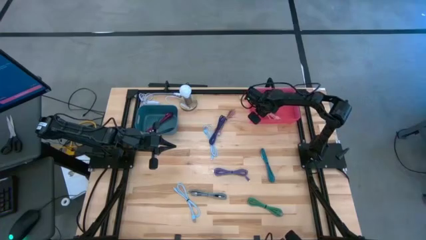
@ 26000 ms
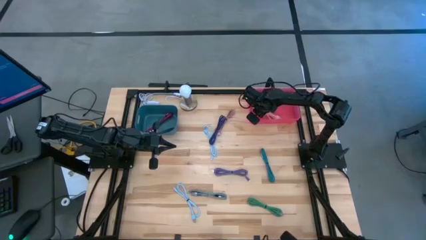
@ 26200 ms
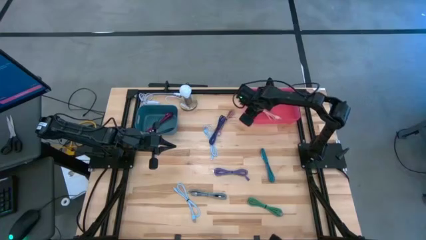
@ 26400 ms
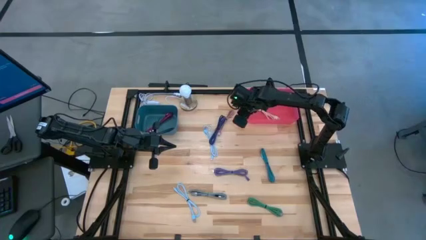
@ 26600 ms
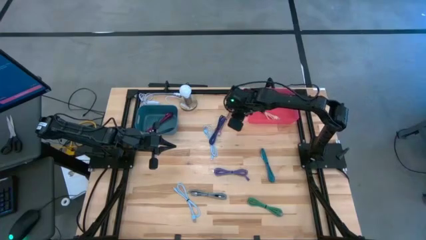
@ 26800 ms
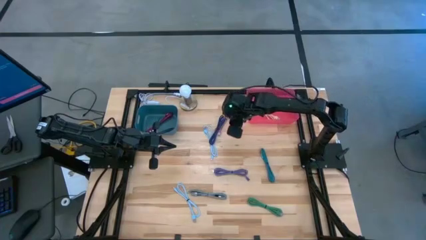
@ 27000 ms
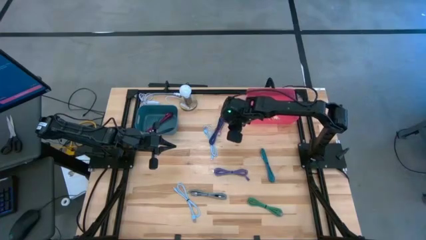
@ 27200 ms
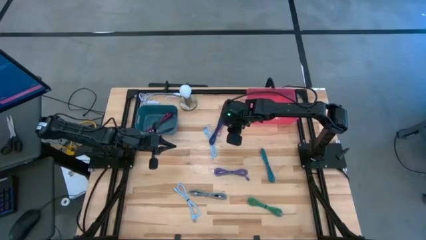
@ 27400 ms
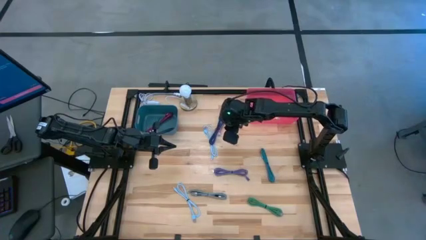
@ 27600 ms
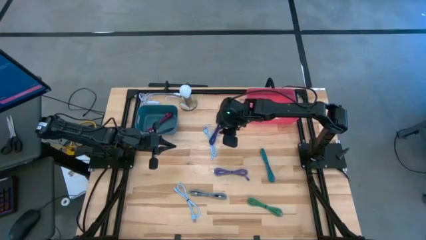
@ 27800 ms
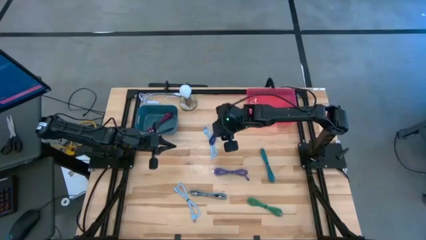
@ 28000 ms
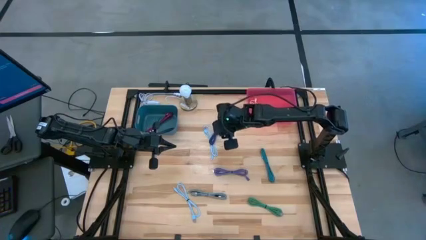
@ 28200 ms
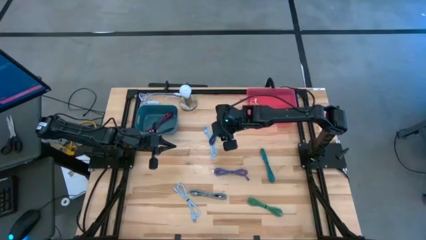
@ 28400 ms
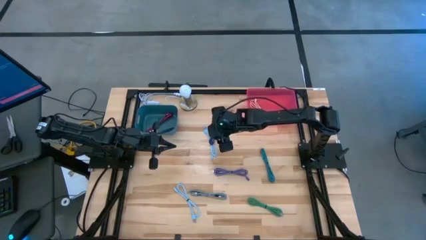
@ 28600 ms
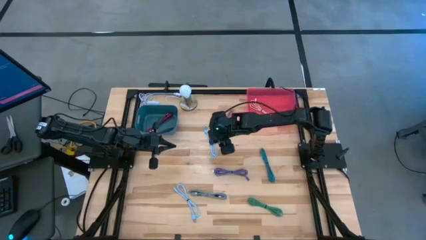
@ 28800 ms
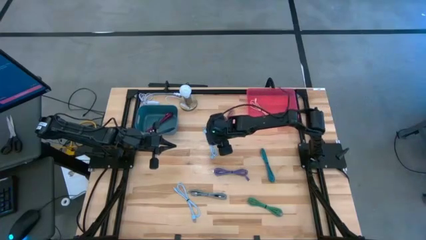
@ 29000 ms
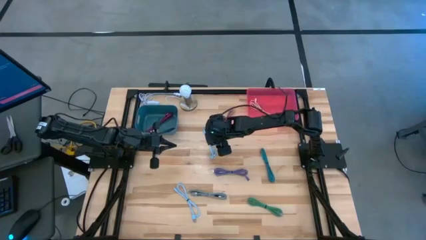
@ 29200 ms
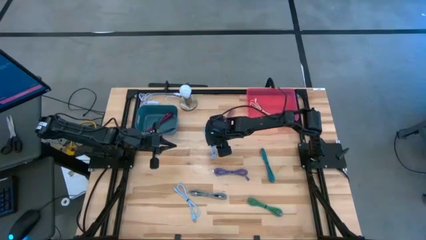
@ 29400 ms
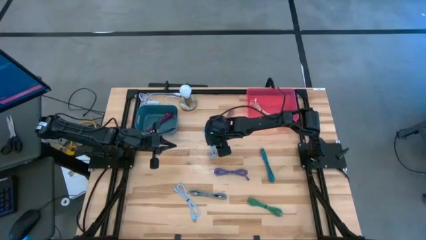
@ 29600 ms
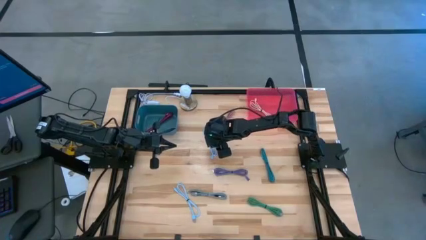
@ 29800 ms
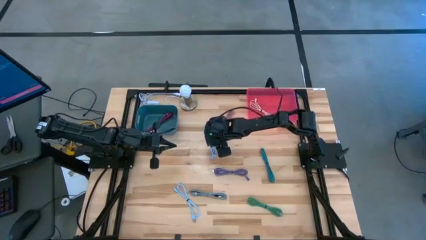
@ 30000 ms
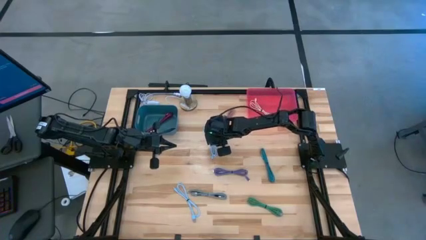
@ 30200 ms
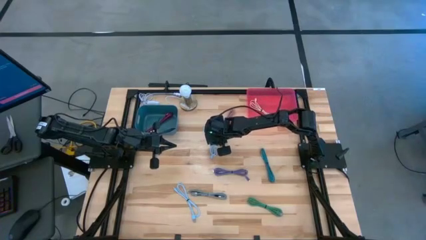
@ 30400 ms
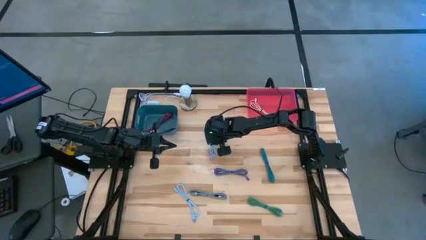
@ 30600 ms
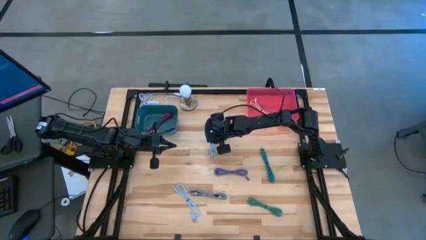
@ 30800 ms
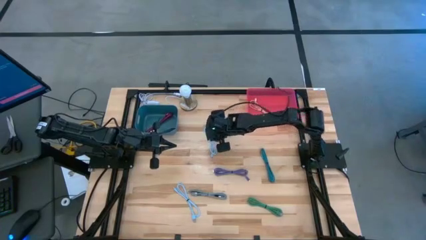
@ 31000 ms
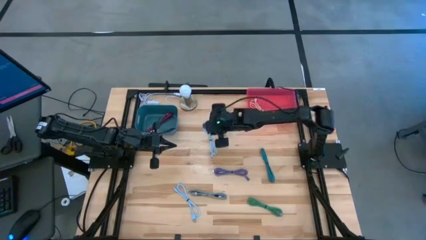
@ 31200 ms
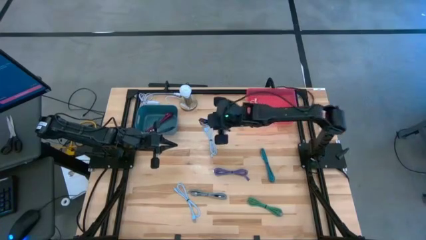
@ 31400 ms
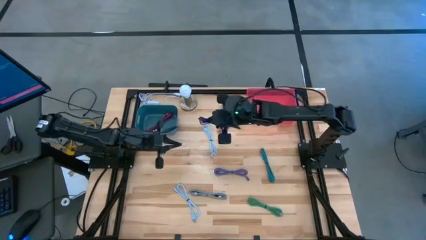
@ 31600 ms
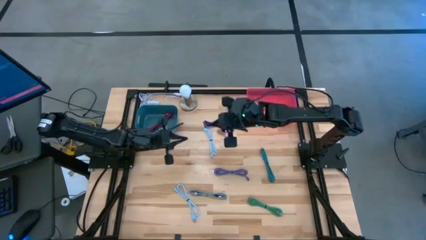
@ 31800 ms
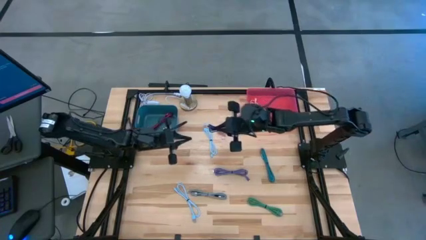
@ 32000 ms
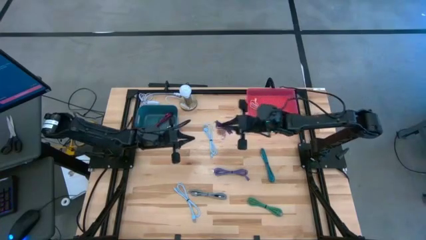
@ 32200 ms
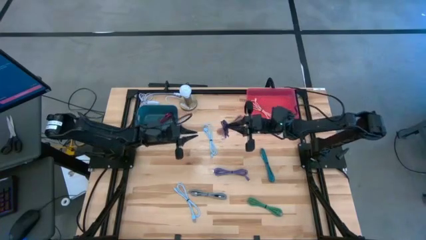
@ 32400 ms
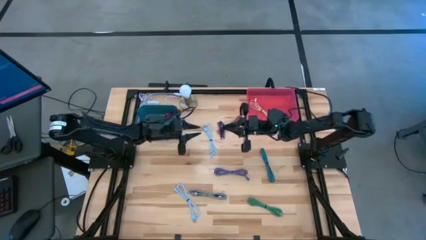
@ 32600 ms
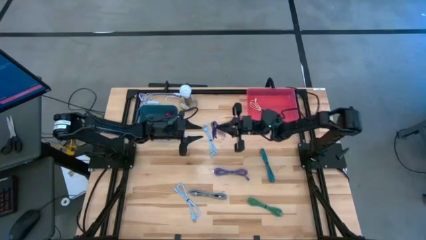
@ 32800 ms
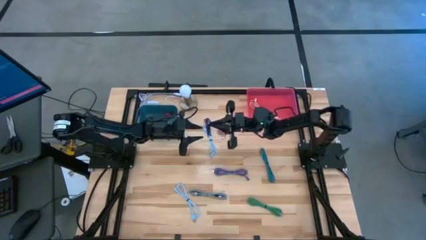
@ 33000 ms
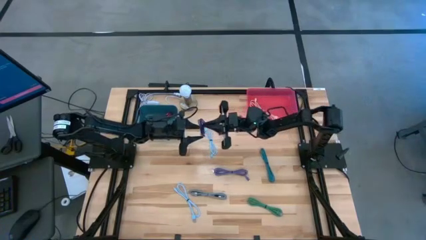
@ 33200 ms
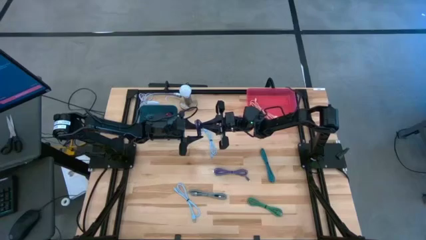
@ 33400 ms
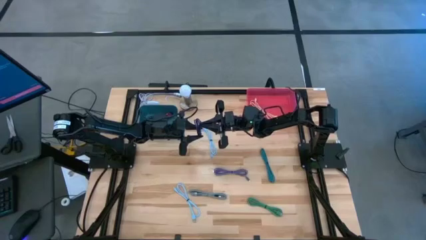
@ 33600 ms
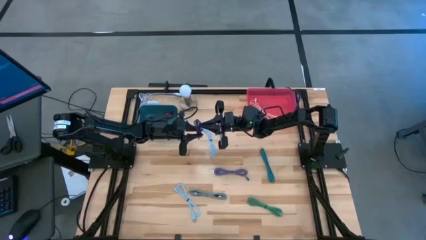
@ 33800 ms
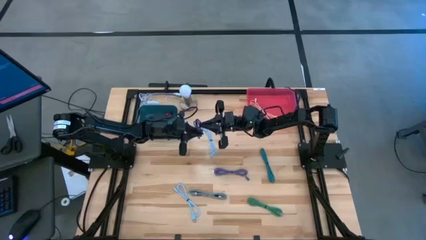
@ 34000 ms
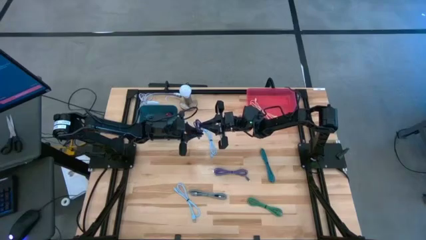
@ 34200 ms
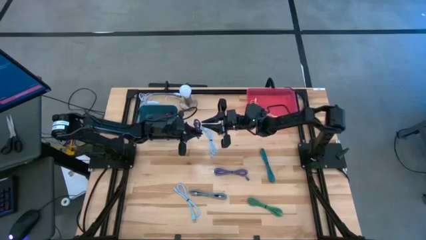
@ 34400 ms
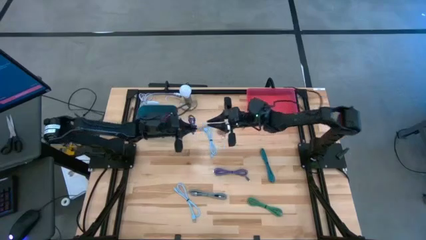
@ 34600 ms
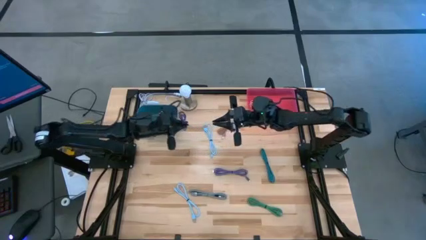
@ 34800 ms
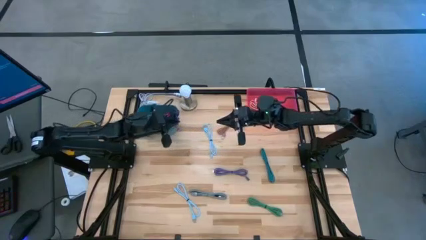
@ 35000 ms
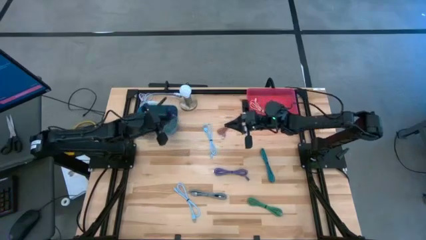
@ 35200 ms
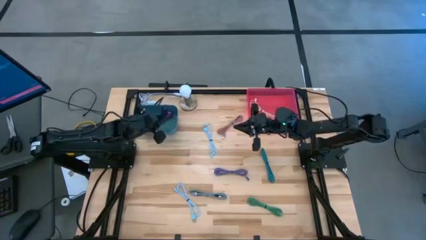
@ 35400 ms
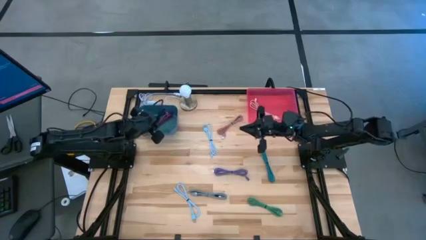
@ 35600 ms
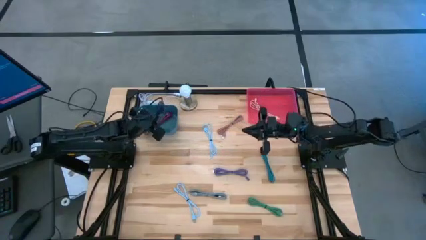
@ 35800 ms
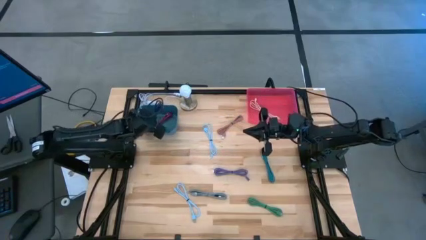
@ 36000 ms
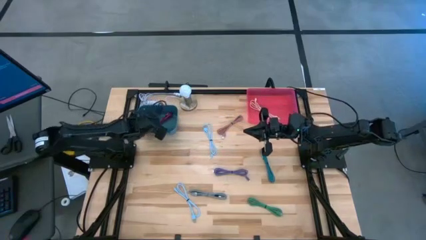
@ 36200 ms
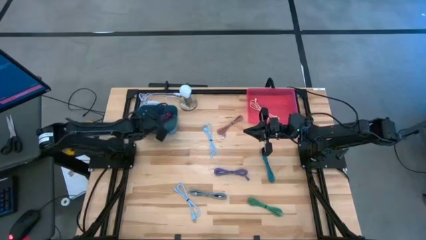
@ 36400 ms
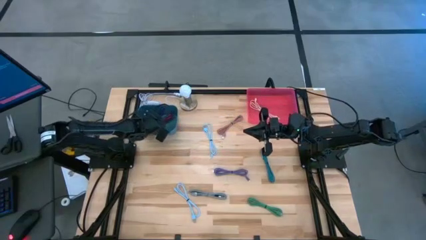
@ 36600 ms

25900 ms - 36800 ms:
Task: Pick & Place USB Port
Put the striped violet charger cable into the blue bin

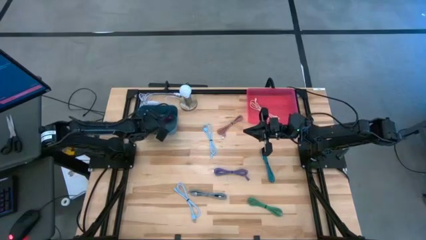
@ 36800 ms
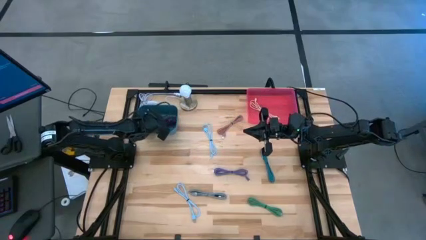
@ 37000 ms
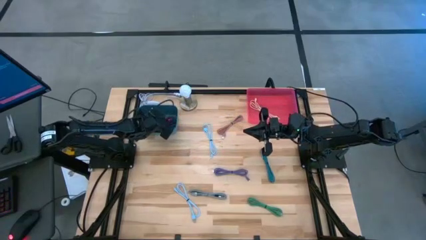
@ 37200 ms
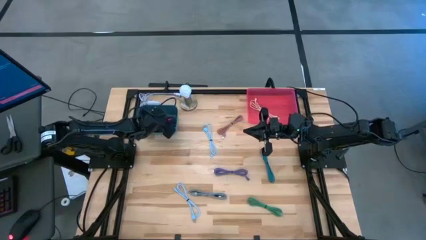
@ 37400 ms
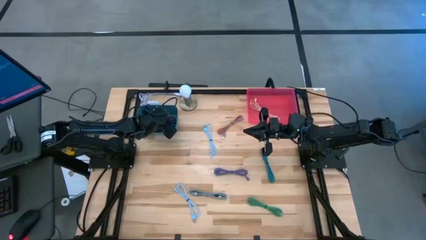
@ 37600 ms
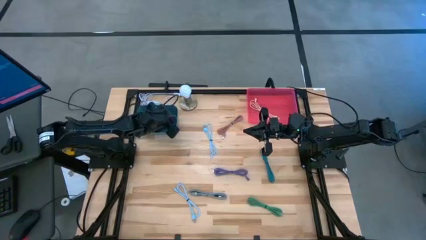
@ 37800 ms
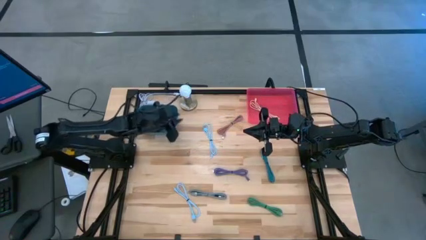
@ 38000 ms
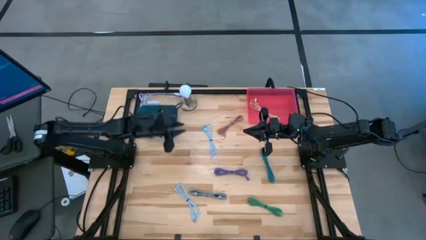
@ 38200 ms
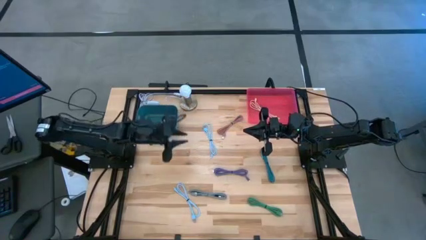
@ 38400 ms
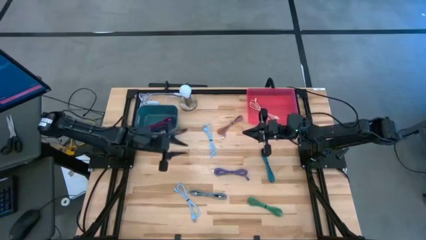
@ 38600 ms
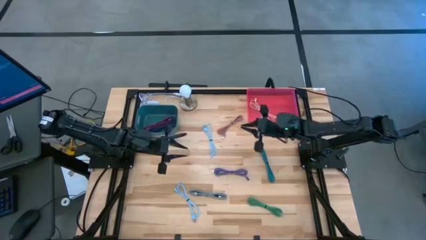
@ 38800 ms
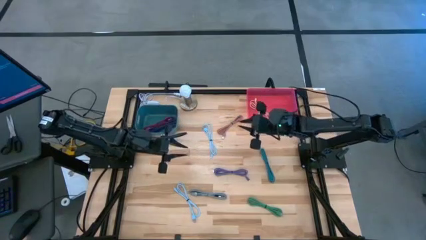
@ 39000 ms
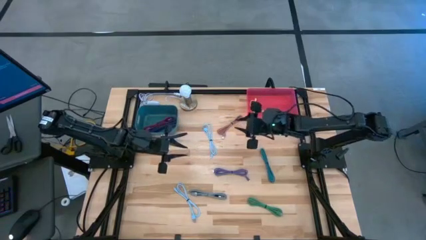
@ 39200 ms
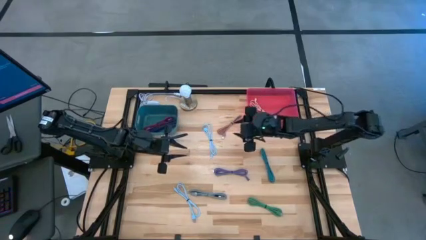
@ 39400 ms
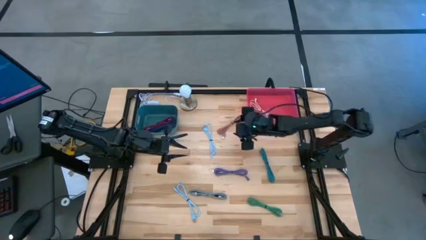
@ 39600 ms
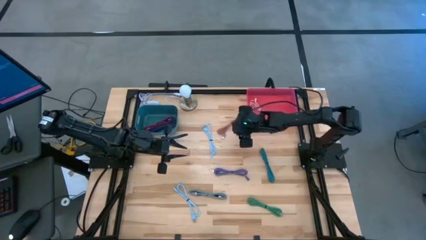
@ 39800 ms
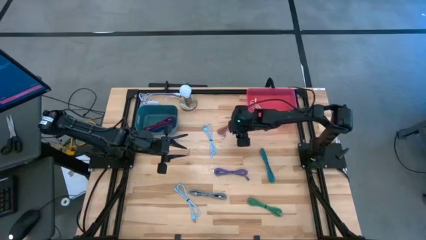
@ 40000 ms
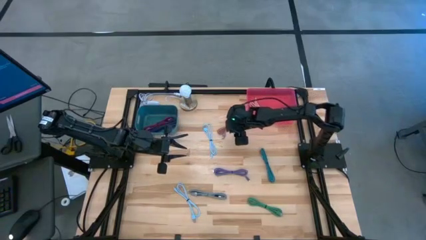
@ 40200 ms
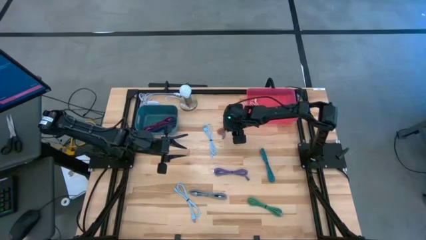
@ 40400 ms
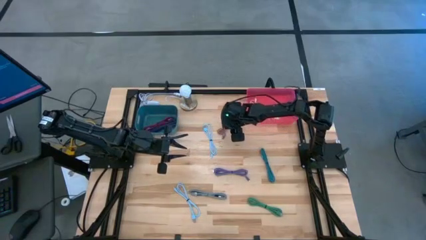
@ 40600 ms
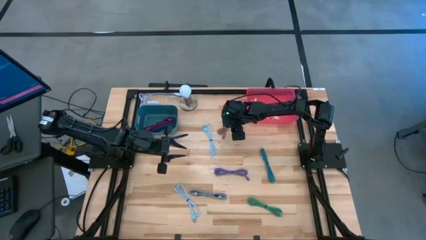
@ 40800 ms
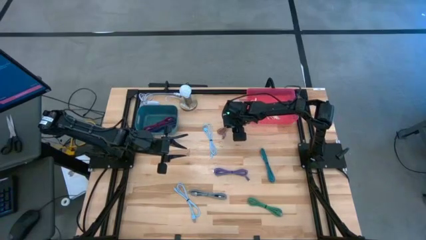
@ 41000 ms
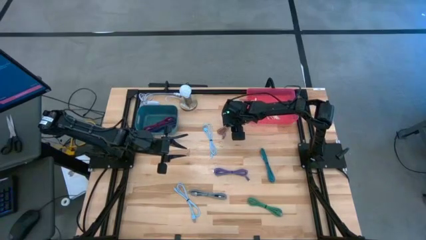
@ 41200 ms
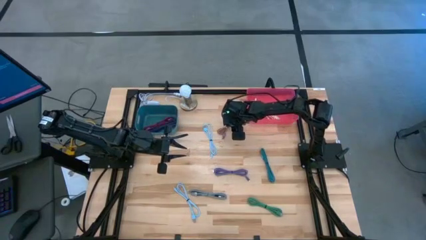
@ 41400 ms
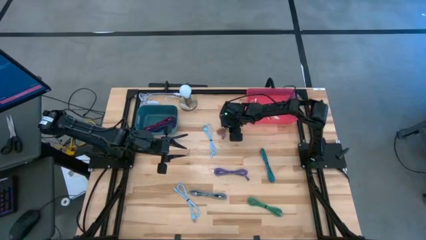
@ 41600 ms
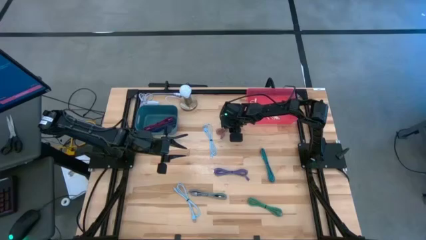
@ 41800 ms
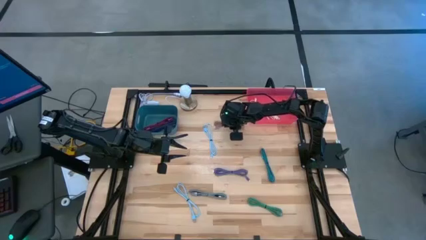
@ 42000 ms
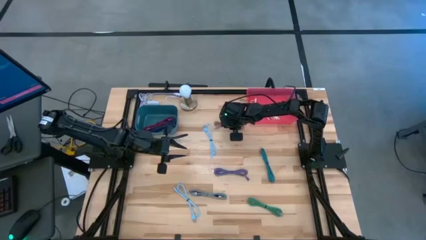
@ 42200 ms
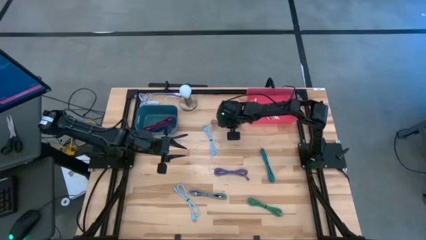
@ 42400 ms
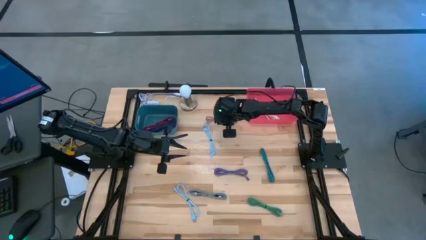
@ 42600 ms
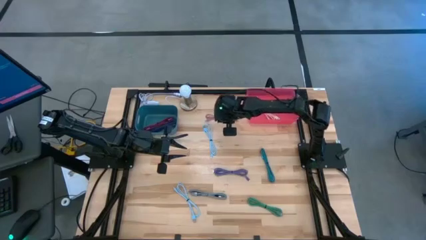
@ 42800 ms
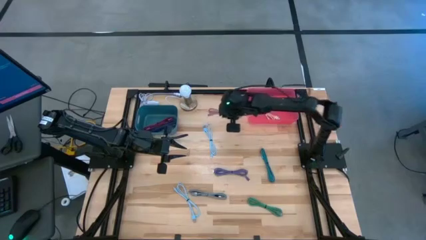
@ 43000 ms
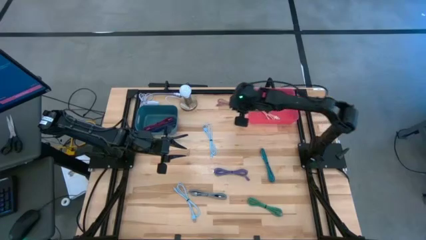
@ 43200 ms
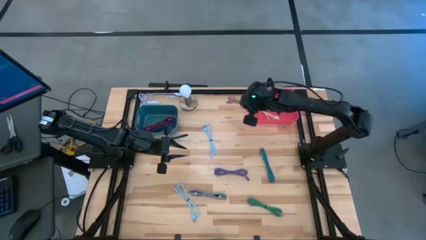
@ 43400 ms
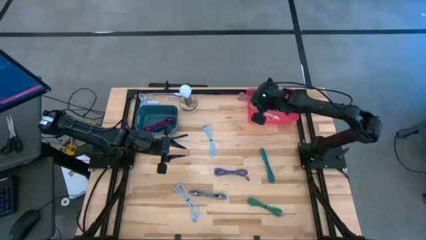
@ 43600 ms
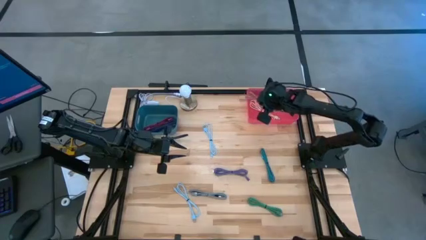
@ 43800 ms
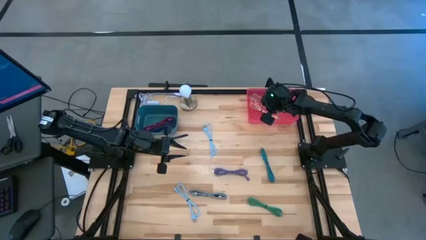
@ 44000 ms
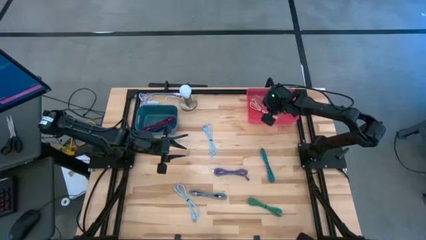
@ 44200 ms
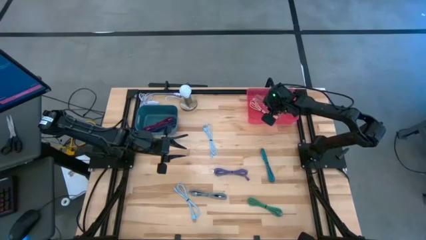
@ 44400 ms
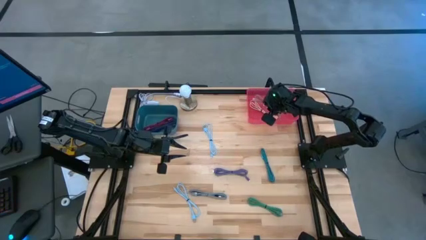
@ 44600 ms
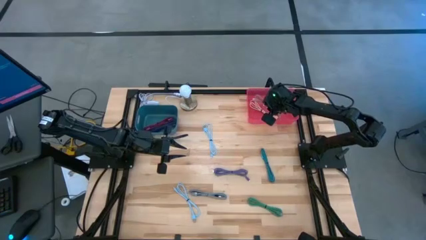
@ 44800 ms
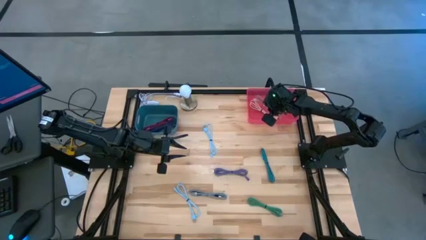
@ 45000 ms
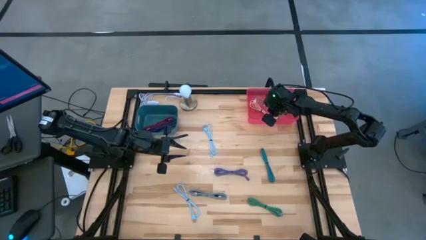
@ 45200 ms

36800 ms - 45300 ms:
Put the plain pink charger cable into the pink bin
